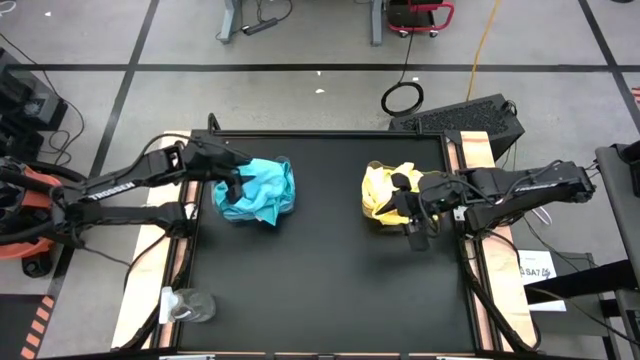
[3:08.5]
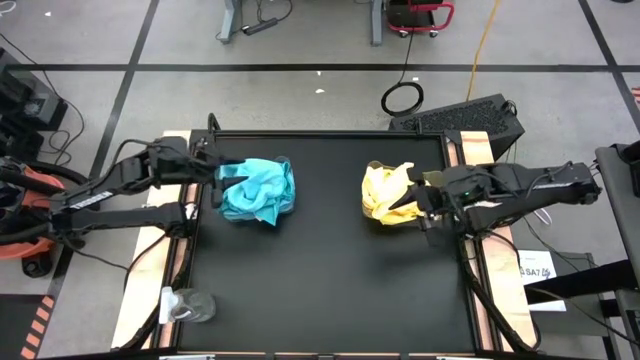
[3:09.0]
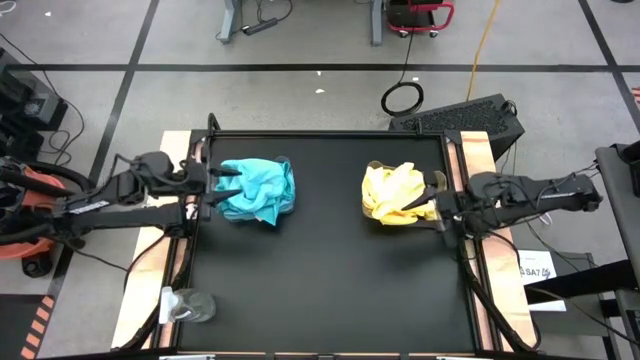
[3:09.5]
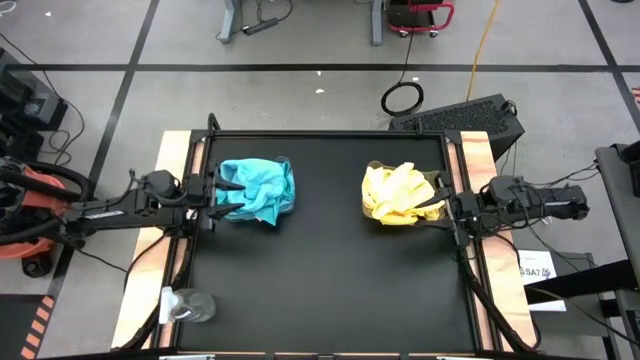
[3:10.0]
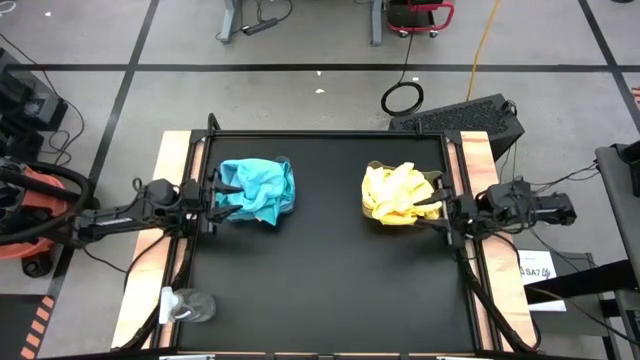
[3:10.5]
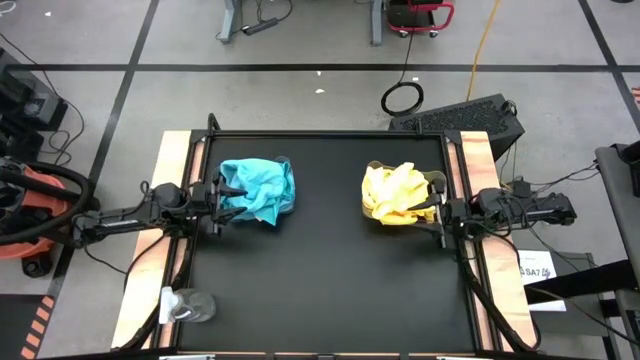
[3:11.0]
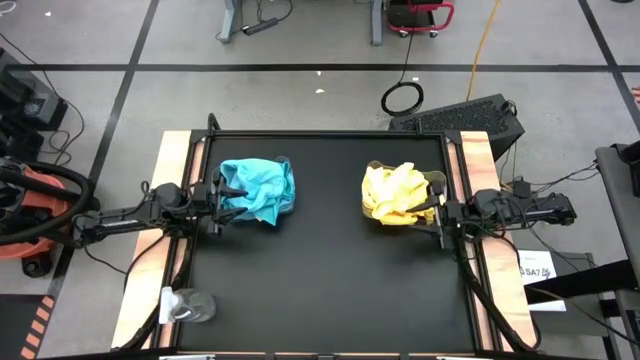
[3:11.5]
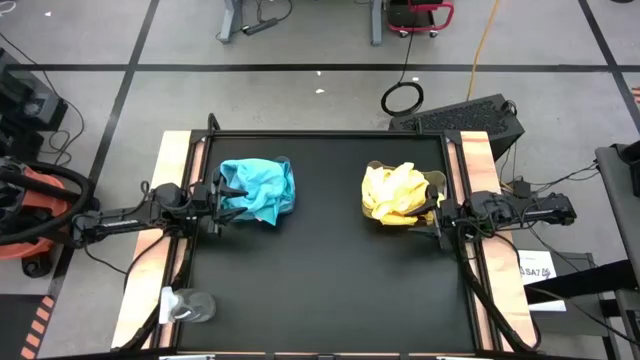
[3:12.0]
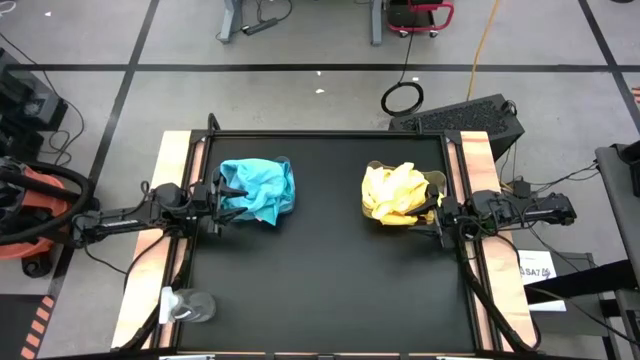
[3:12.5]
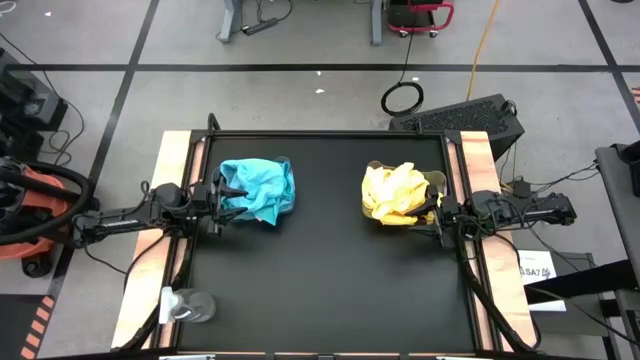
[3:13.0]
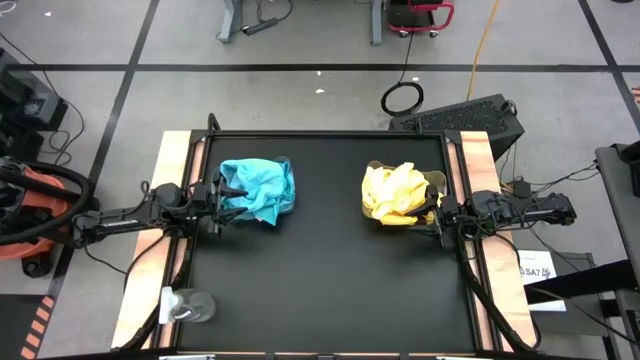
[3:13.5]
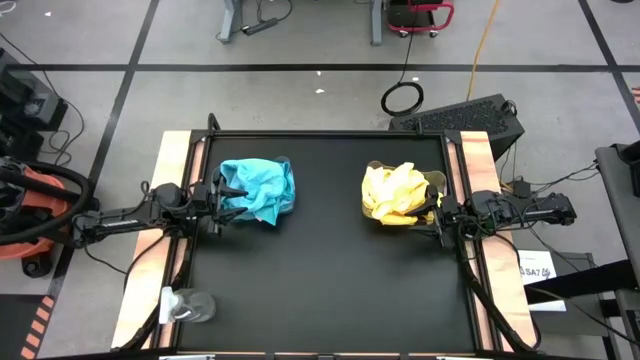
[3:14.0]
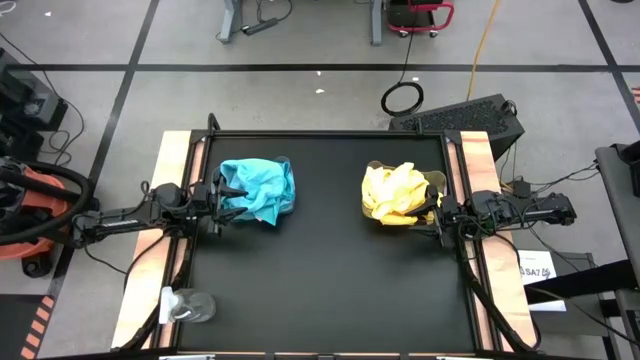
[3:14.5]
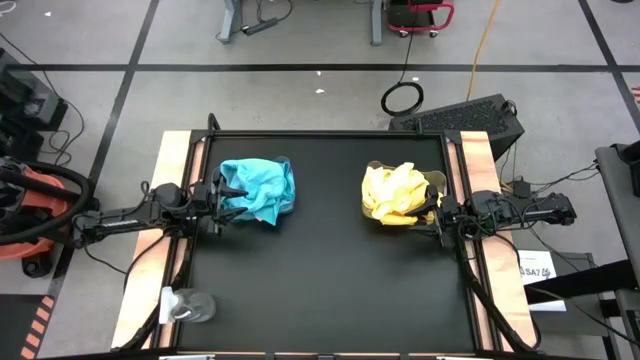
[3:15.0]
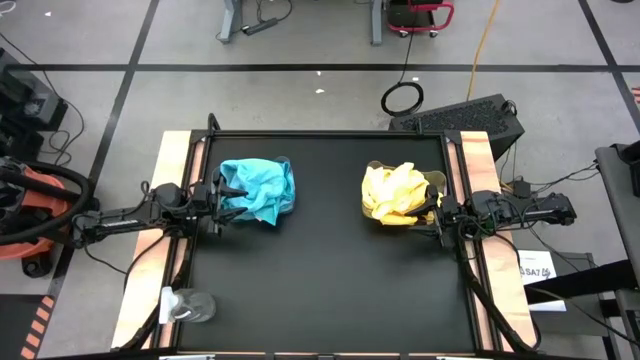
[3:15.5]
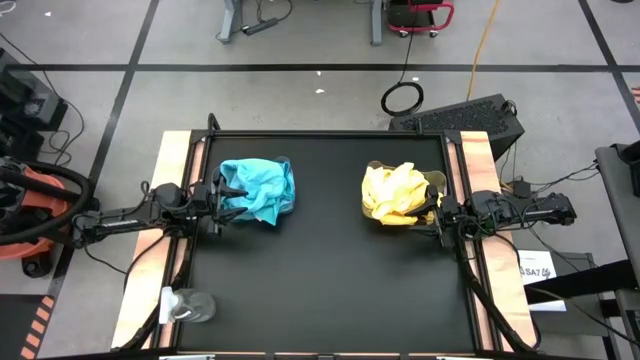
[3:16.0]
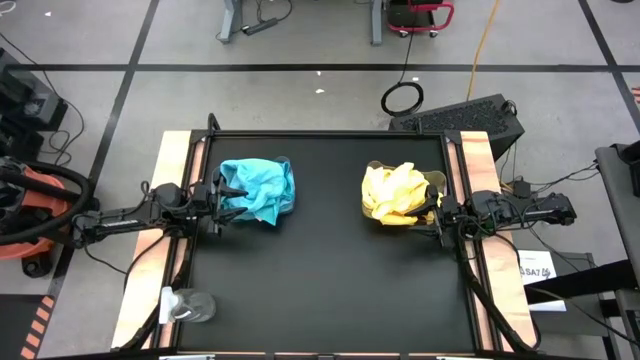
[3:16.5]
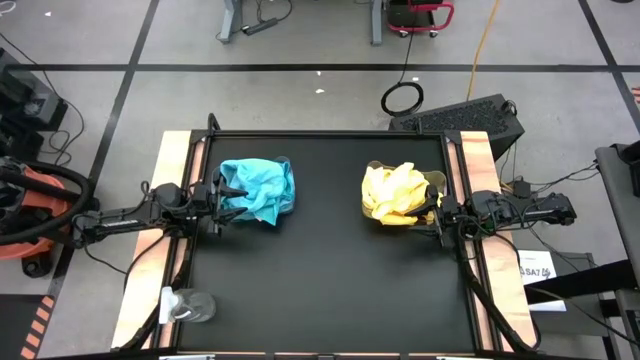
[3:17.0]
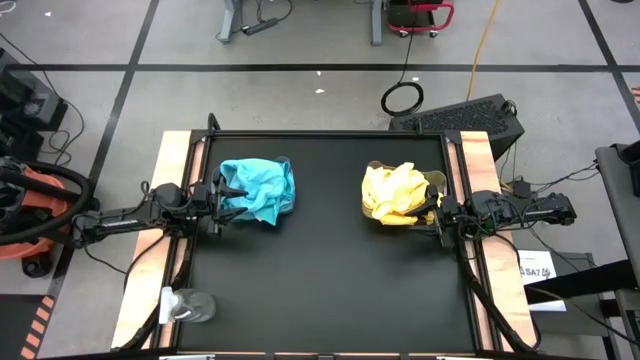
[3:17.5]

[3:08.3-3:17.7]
Task: Sort microfiber towel by color & place in baskets
Return to Home Position

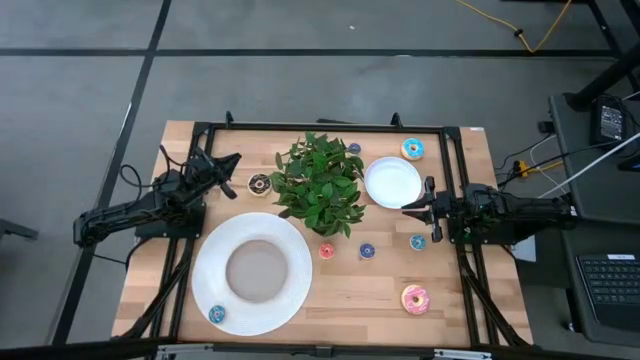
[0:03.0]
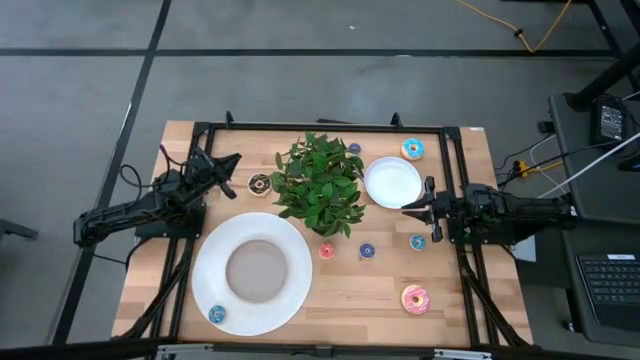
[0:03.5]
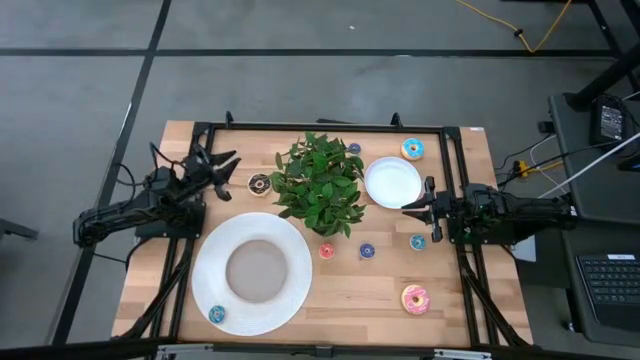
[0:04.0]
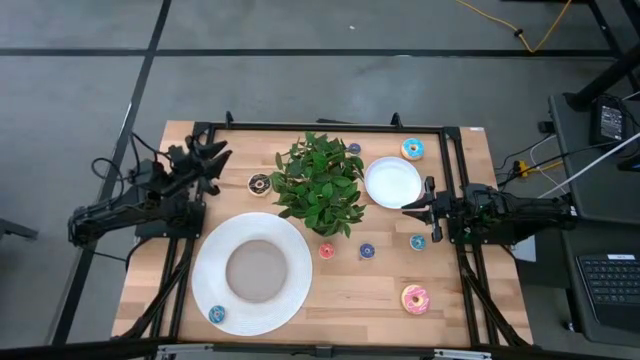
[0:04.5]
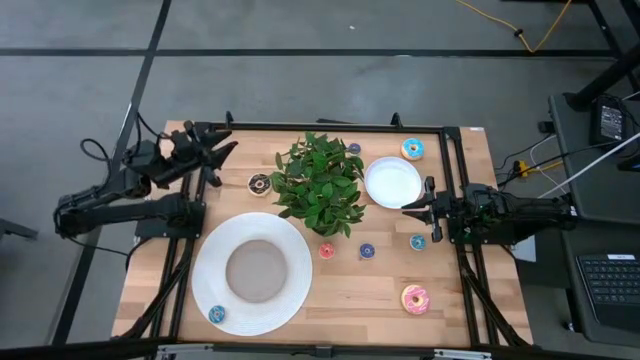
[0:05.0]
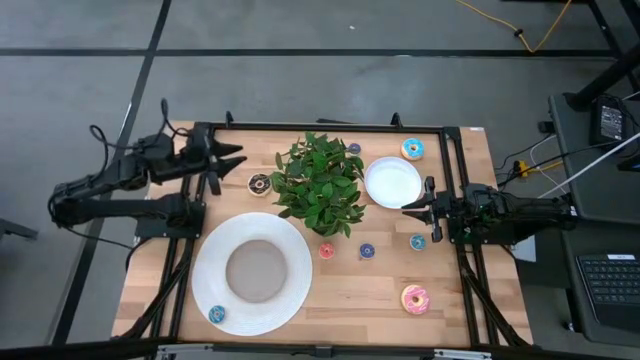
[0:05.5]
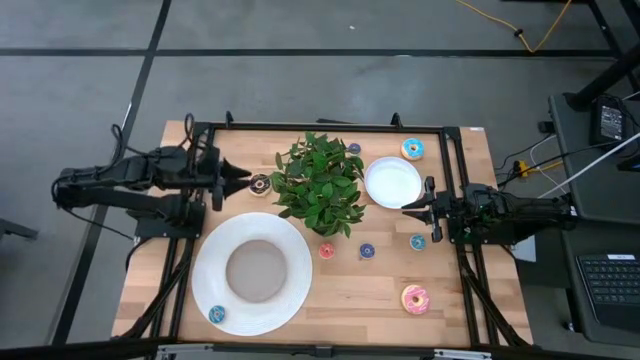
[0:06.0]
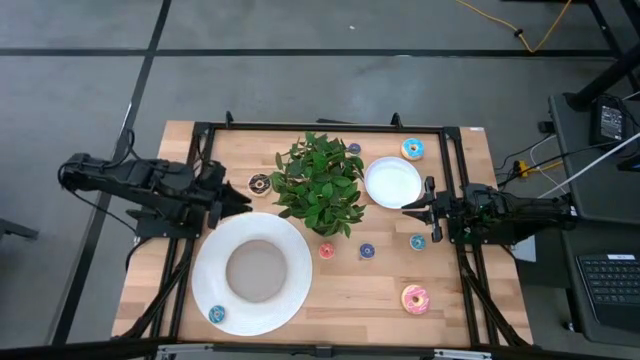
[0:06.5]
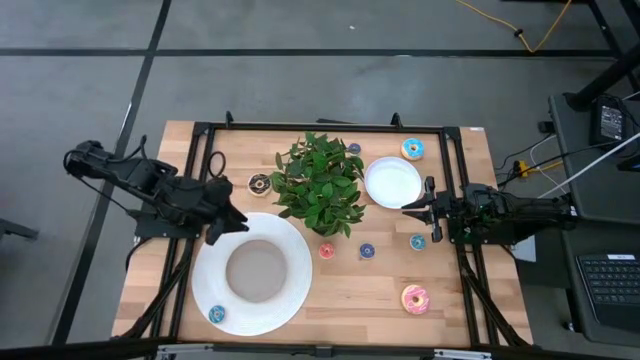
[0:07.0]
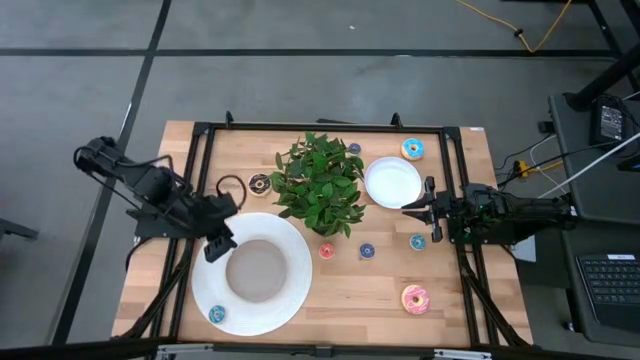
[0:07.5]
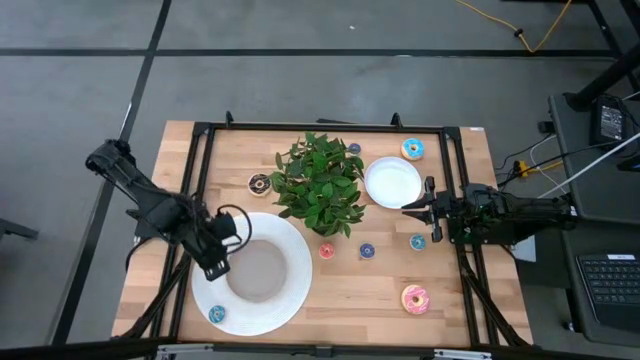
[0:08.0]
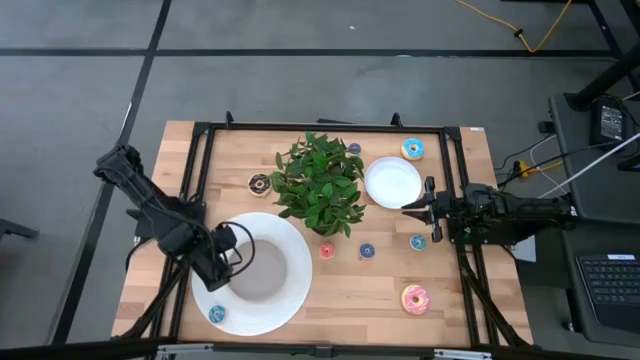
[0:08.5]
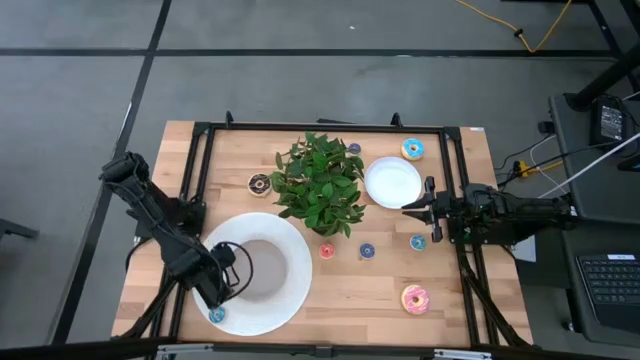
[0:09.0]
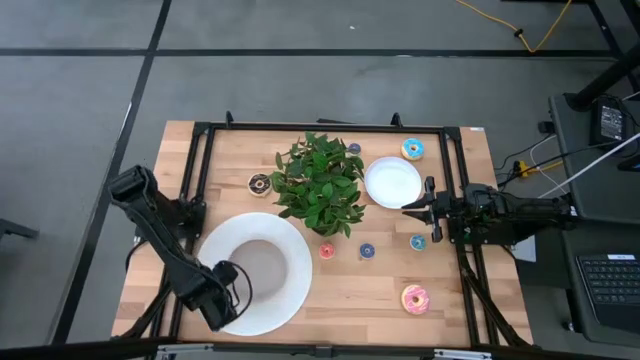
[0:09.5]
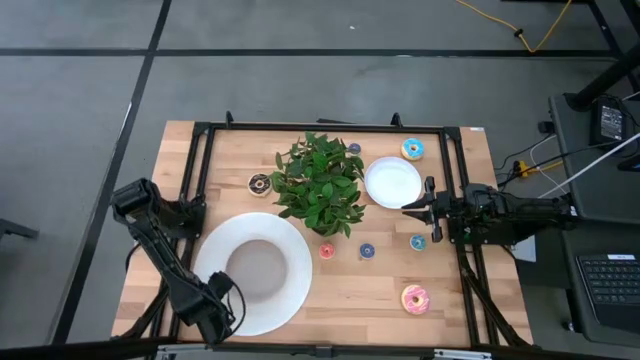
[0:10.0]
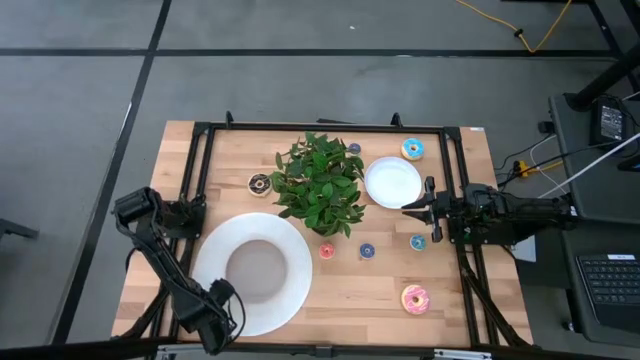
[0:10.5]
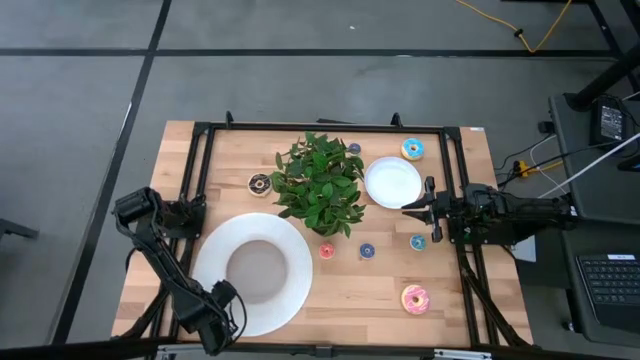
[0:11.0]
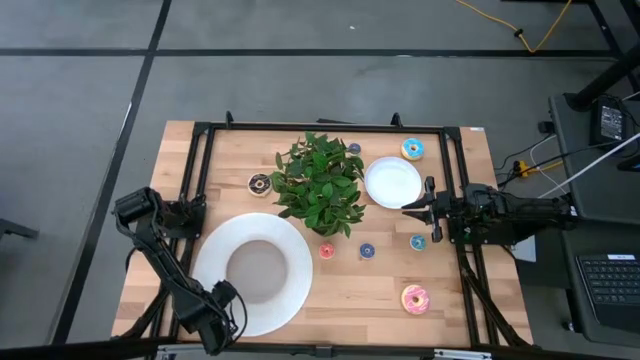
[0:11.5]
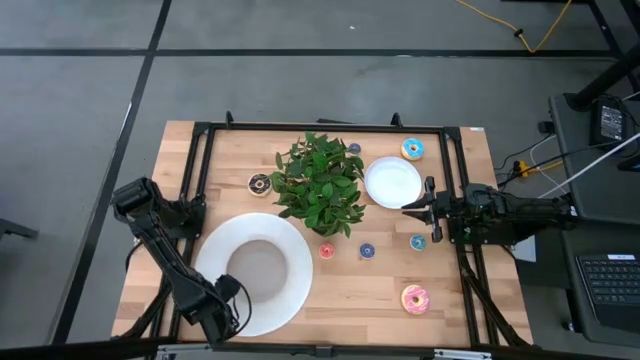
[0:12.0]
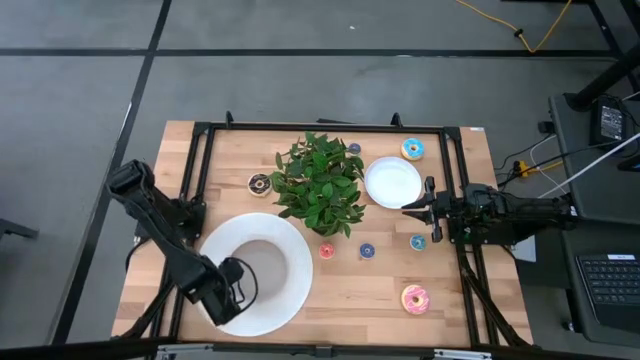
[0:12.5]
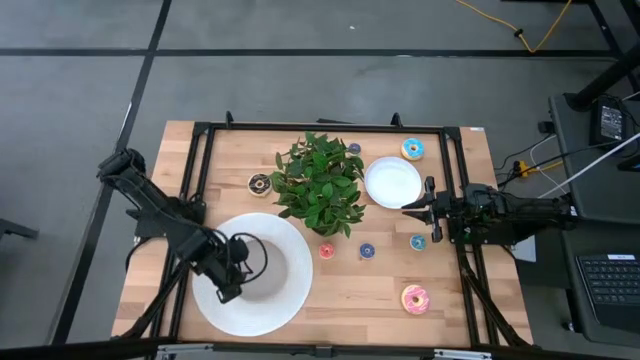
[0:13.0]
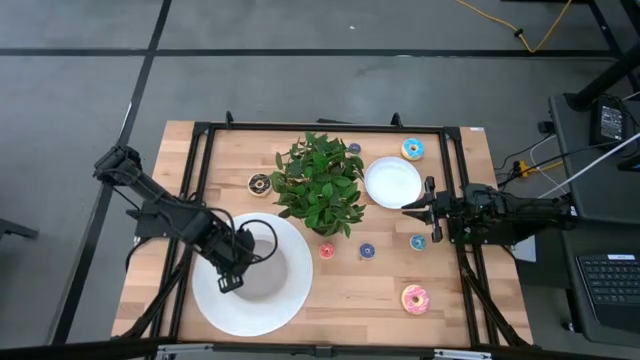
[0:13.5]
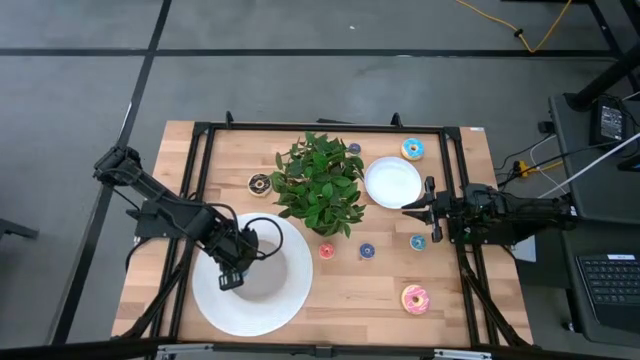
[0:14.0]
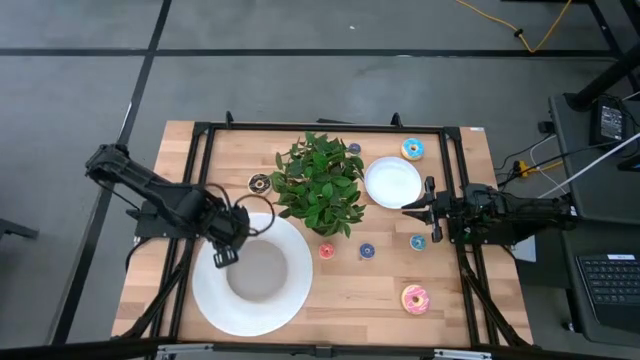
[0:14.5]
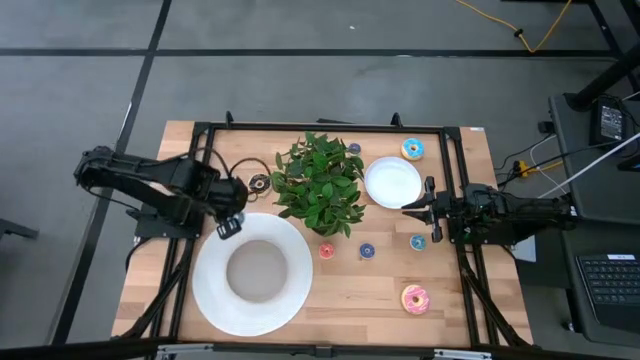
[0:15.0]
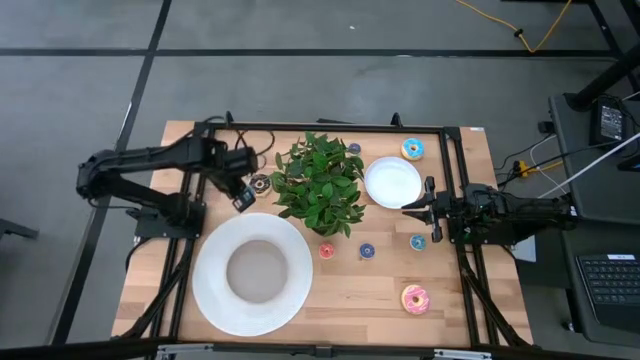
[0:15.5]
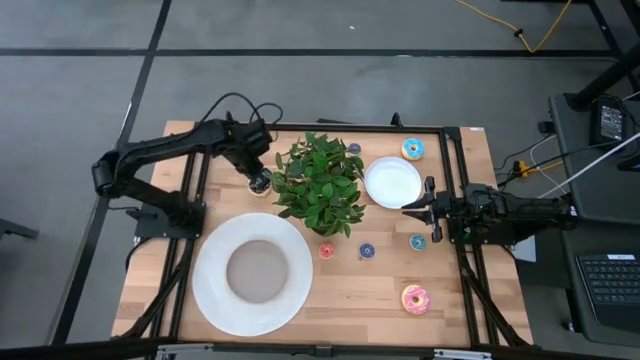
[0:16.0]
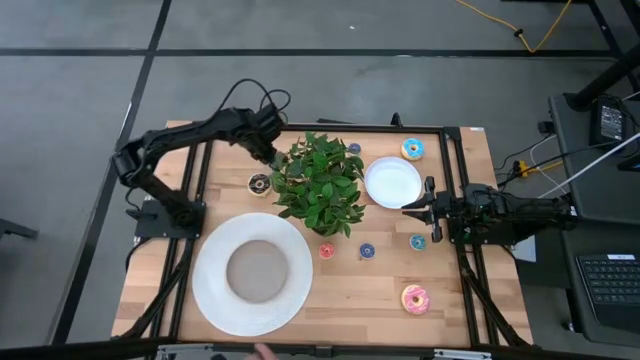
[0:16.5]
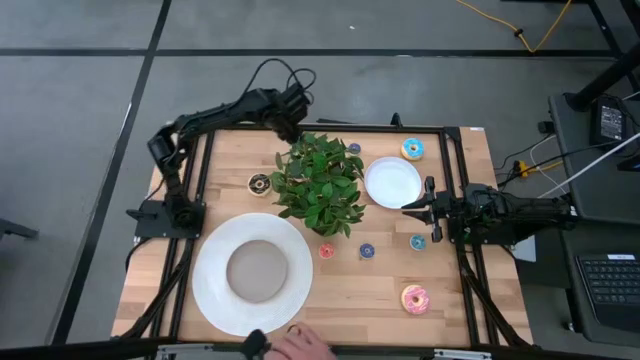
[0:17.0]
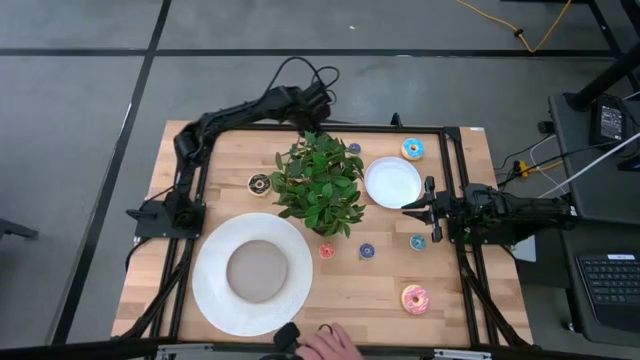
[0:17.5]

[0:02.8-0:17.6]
Task: Pick & Place donuts
Put the small light blue donut on the white plate
